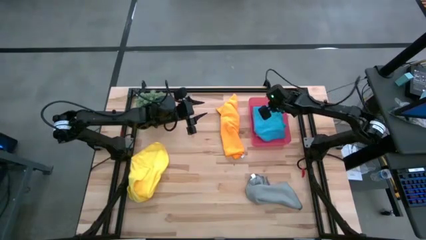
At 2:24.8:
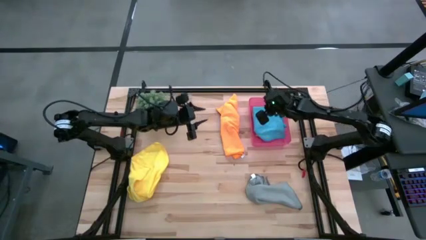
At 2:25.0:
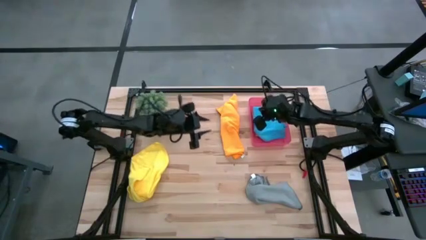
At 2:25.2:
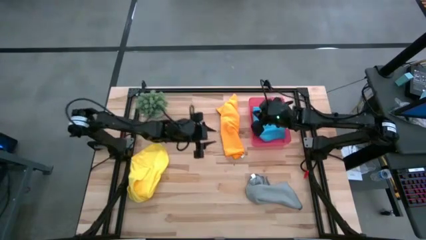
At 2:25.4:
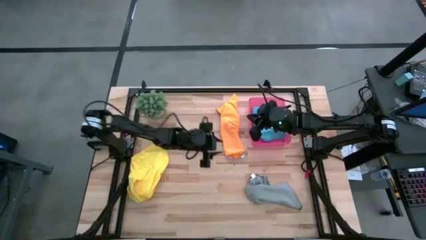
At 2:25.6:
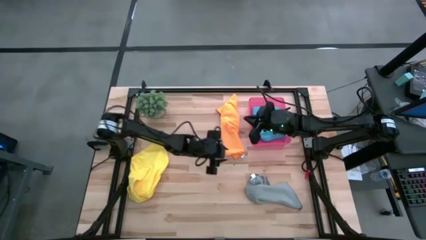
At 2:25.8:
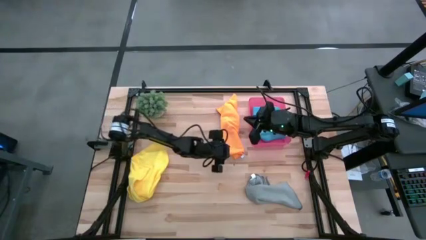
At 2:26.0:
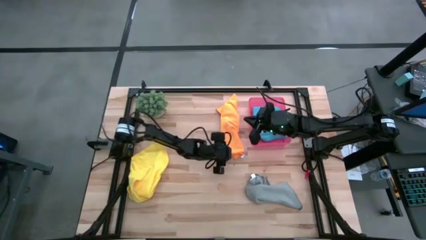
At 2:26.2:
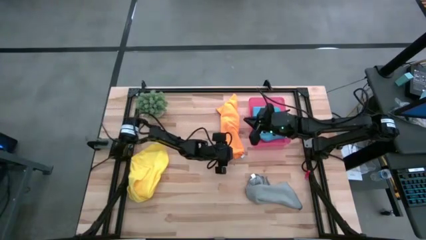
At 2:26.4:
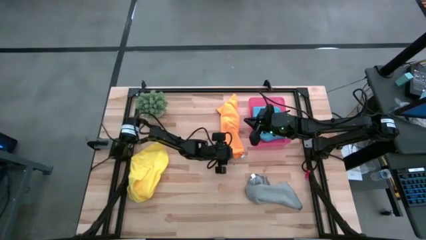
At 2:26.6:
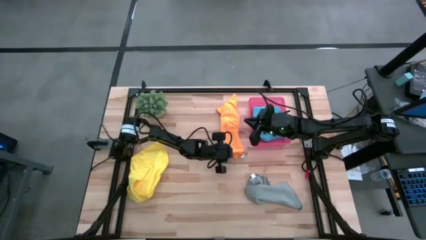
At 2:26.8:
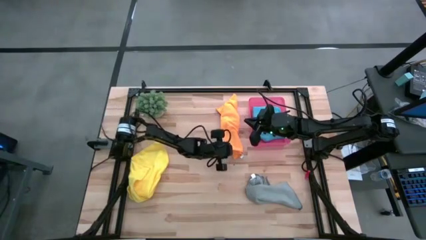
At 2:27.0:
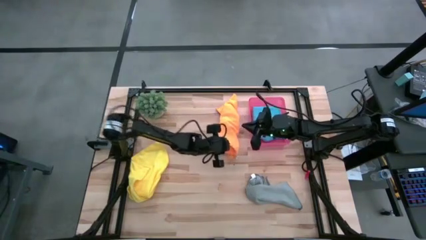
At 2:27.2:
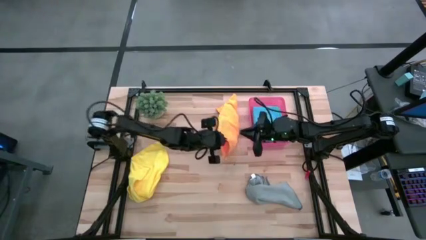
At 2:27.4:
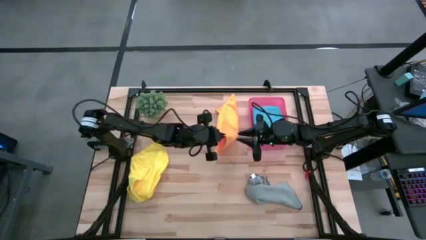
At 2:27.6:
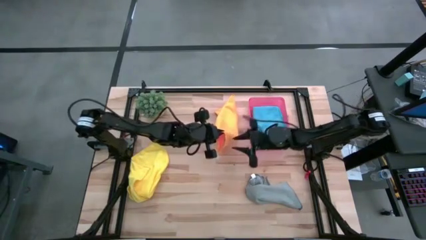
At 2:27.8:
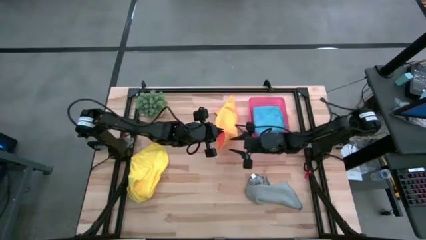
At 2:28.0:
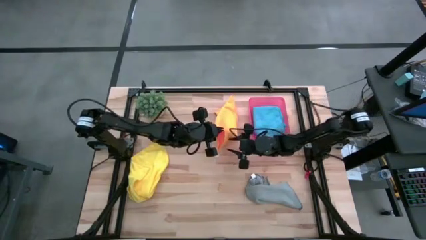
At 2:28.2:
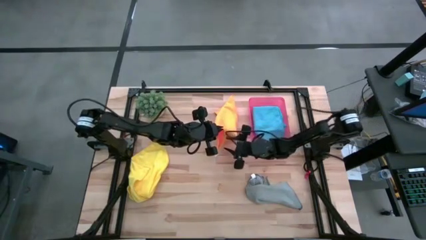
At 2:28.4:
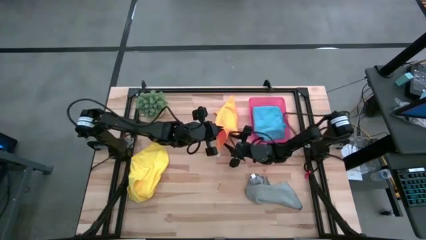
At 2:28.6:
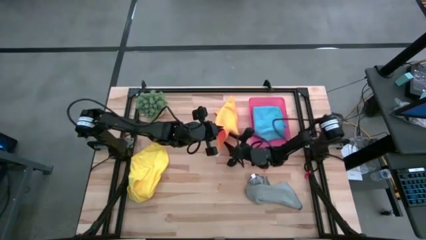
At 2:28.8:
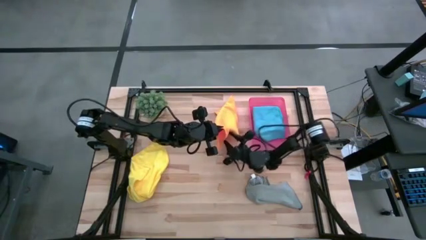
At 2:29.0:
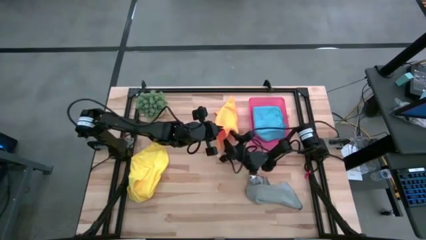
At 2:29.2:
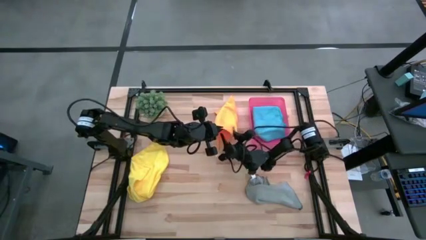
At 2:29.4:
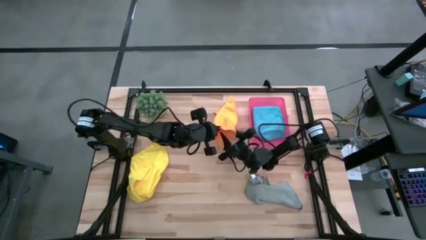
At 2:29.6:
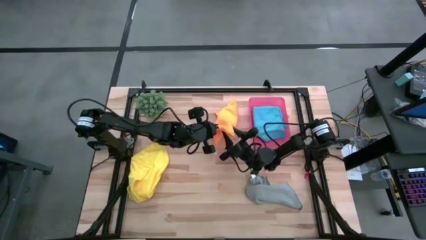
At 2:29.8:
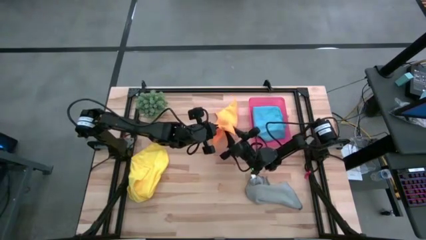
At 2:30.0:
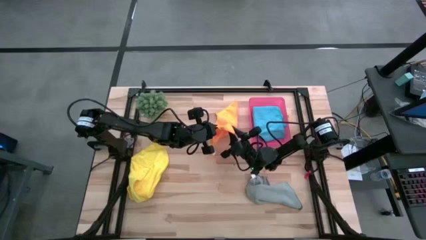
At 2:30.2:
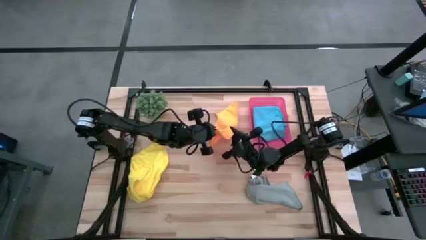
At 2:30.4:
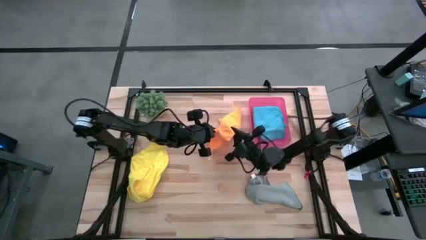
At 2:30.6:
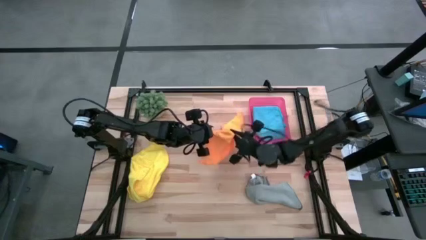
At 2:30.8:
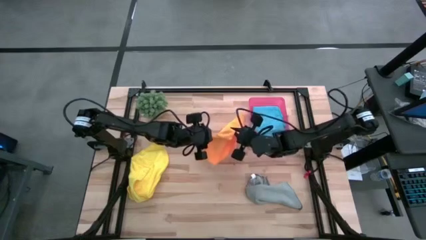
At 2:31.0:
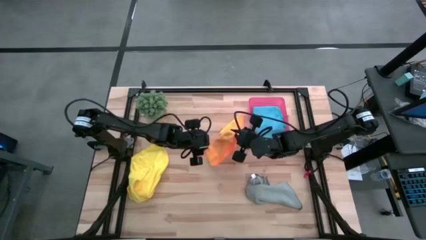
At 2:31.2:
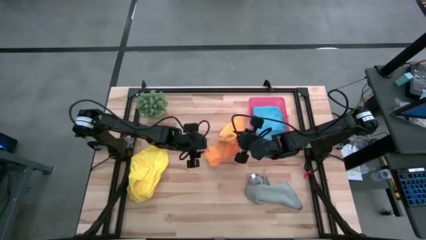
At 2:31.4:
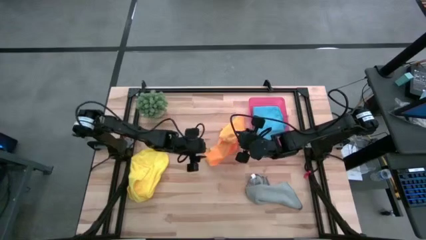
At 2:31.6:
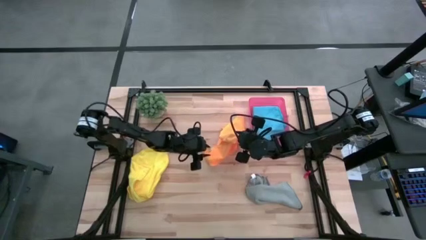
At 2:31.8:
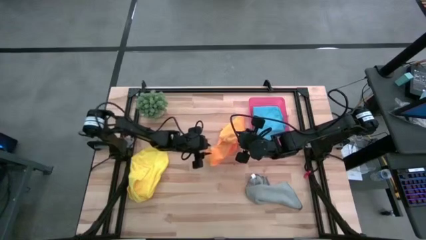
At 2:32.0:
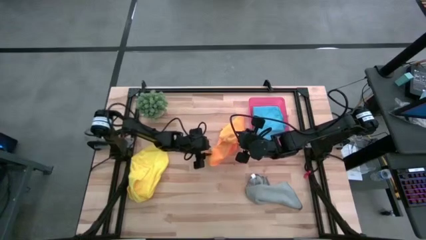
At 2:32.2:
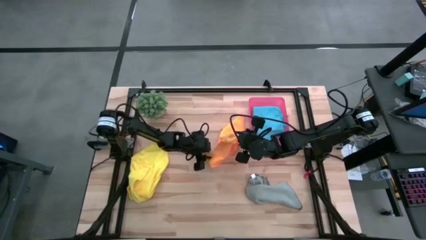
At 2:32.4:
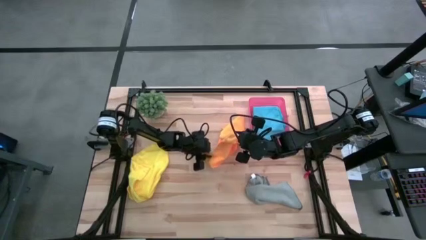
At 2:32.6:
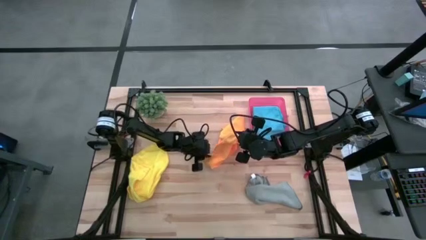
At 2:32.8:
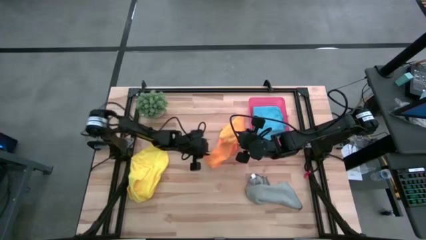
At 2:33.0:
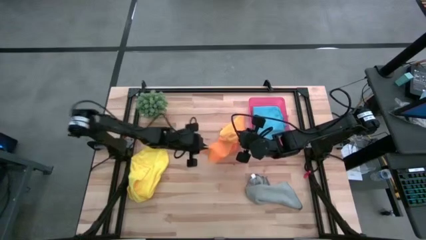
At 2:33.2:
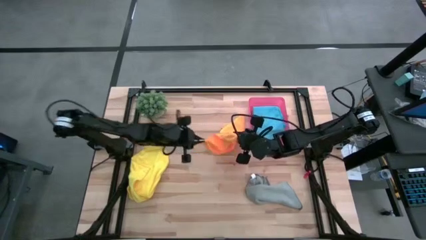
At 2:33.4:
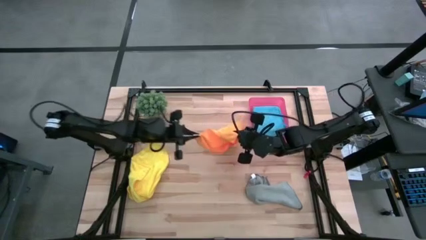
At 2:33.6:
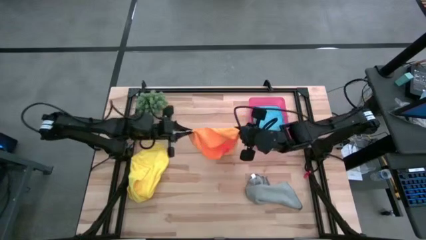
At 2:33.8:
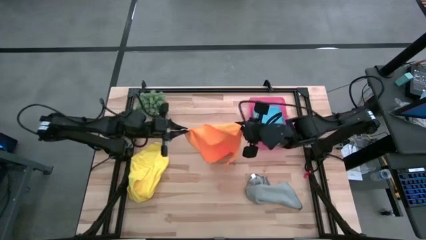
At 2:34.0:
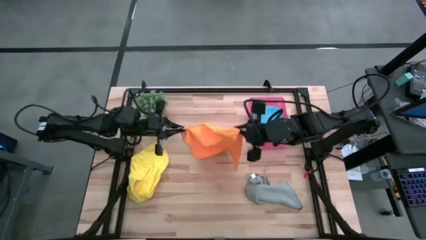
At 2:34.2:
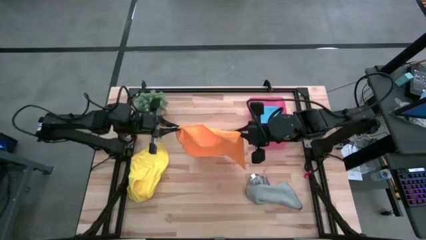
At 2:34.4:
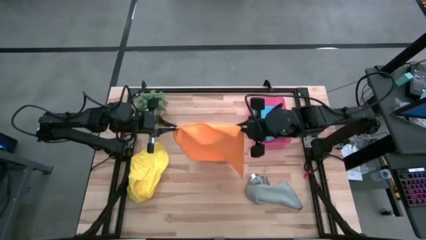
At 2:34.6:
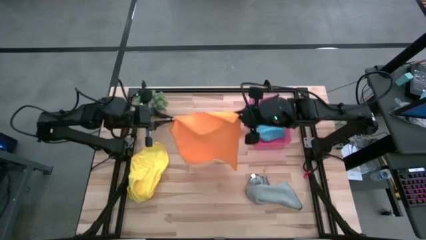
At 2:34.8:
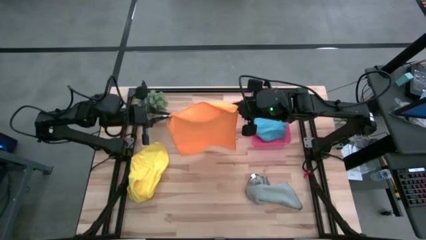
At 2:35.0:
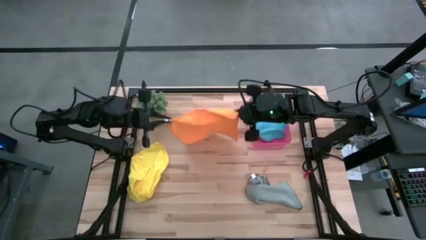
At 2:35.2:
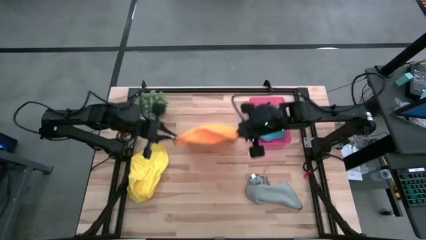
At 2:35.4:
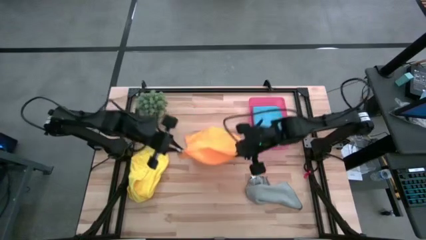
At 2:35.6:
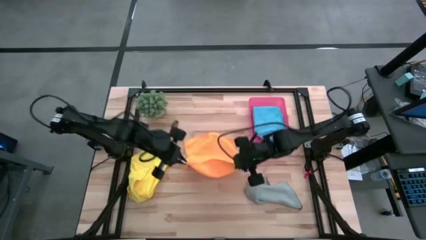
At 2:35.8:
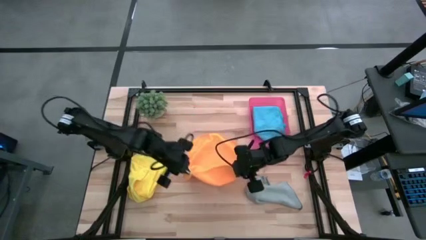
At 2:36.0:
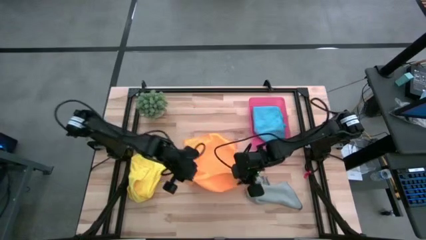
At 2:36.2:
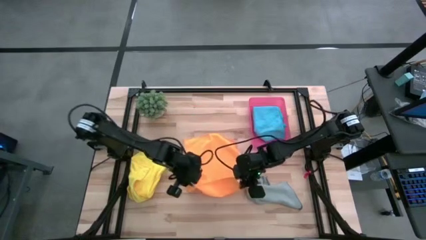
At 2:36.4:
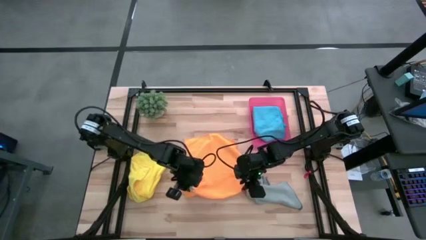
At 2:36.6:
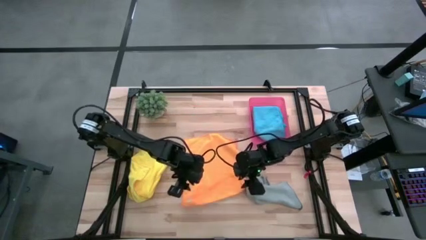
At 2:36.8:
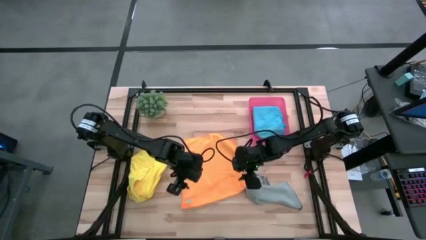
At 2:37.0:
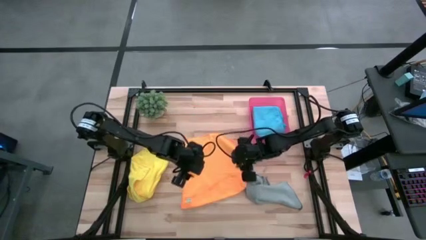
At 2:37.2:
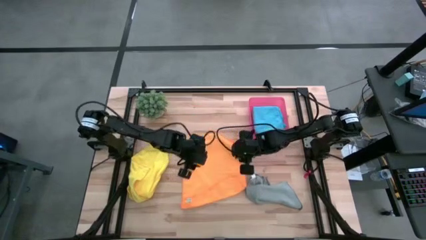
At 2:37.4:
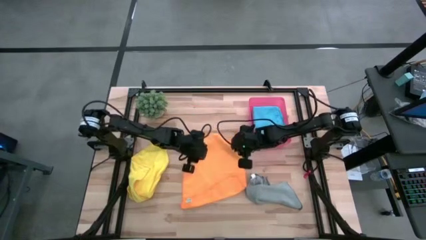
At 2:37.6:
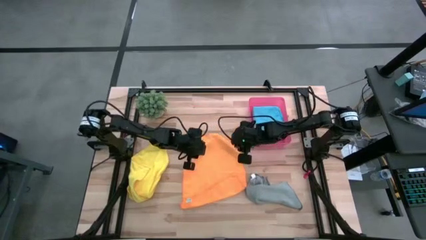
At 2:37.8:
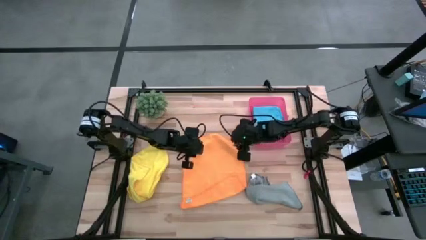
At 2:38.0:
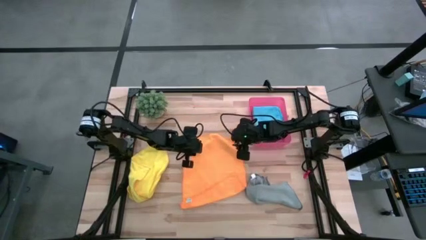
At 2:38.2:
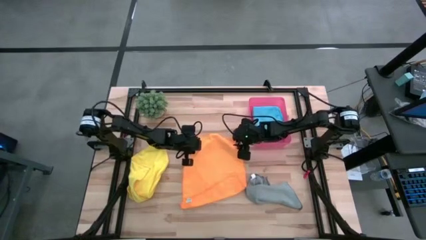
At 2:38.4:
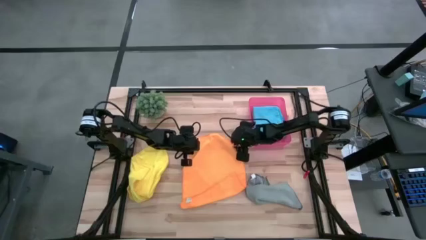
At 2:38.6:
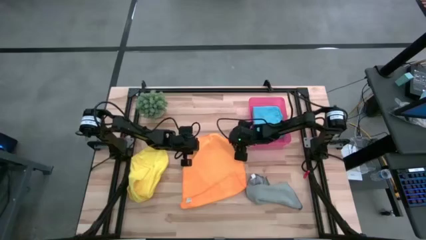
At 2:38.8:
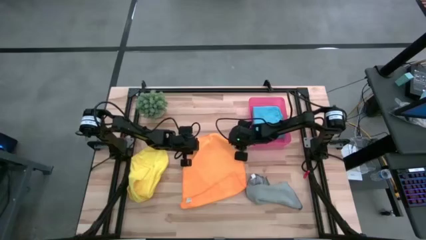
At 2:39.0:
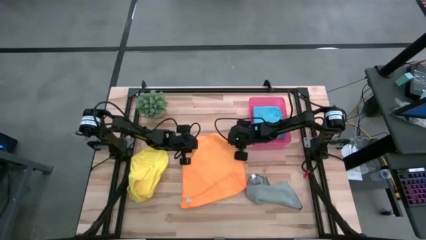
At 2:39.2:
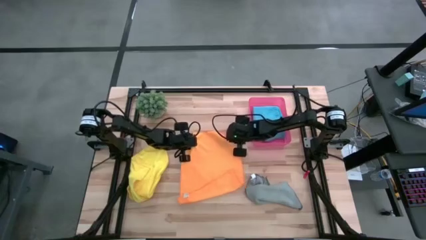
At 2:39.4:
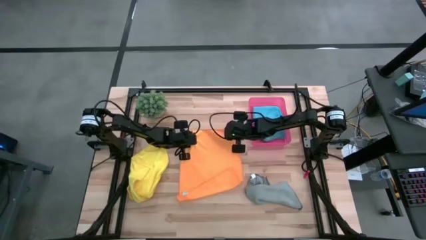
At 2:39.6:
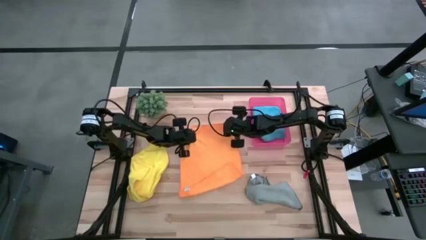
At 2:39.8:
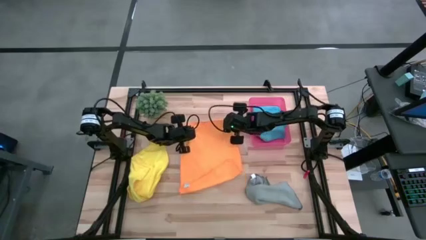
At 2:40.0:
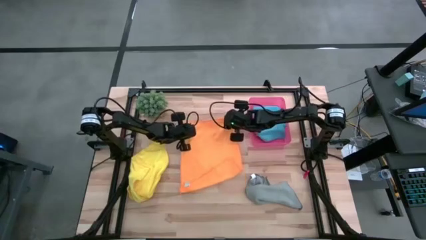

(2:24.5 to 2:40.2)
Task: Fold microfiber towels
Fold the orange microfiber cloth
